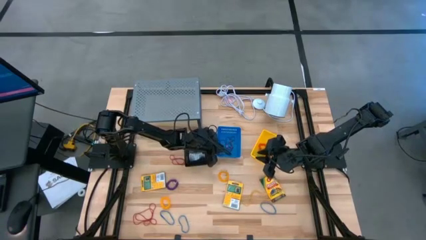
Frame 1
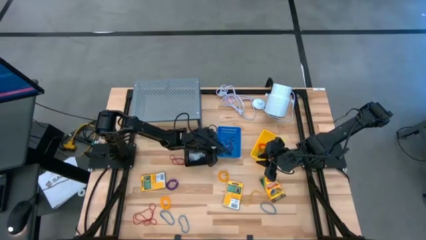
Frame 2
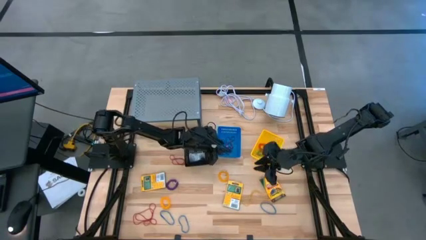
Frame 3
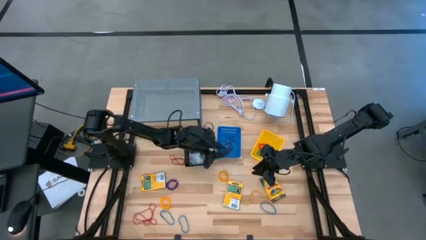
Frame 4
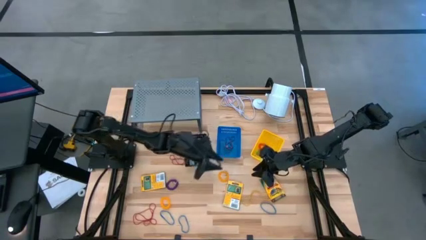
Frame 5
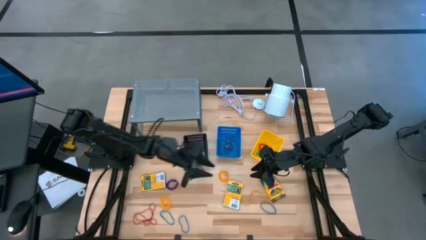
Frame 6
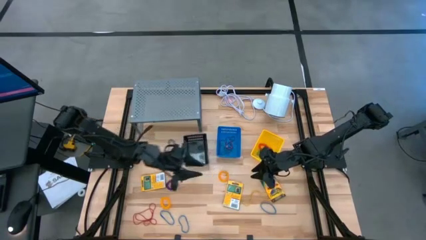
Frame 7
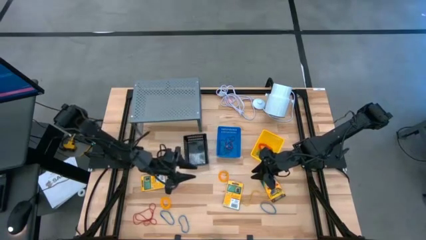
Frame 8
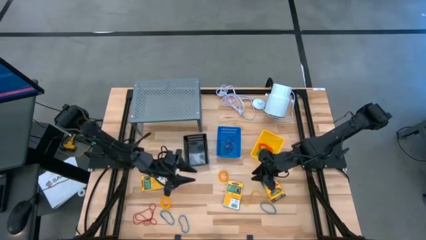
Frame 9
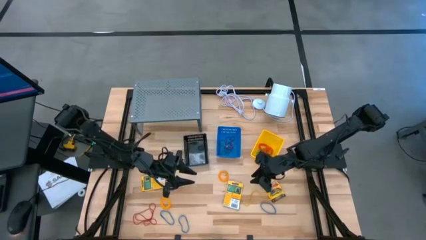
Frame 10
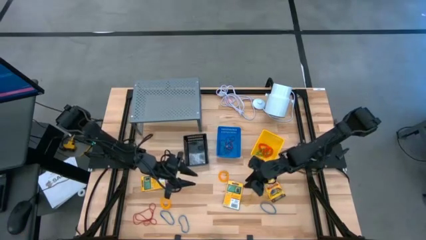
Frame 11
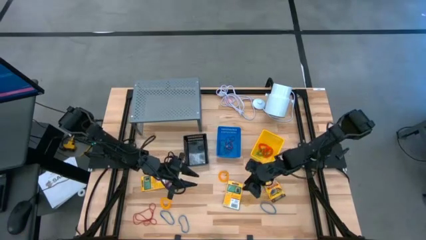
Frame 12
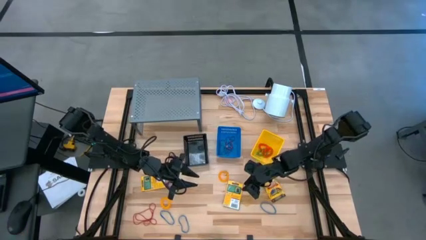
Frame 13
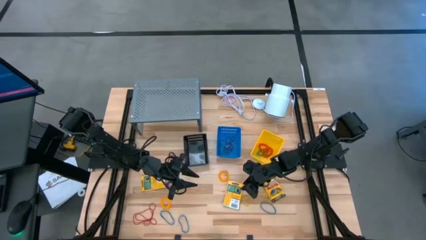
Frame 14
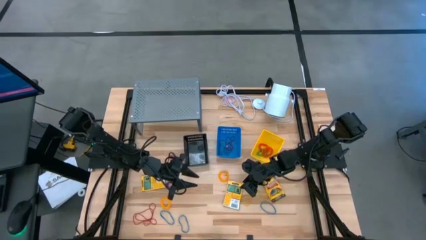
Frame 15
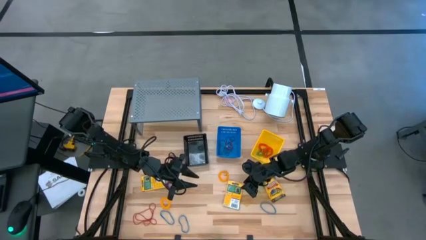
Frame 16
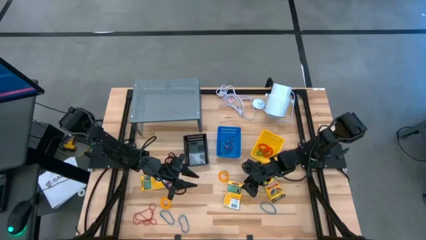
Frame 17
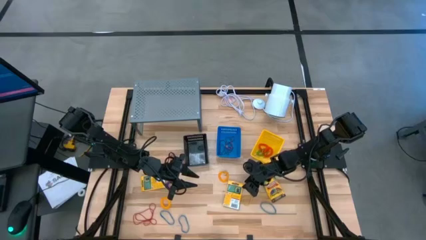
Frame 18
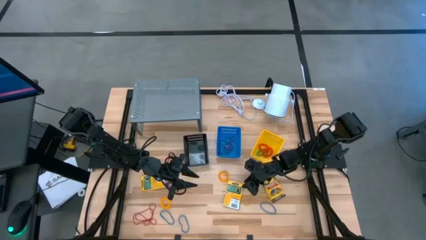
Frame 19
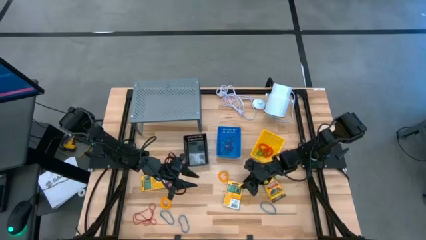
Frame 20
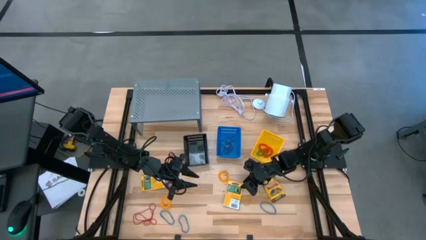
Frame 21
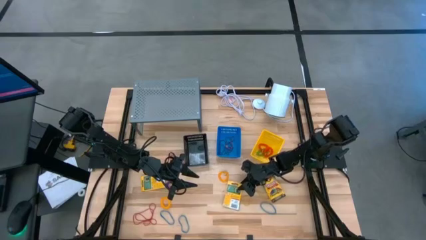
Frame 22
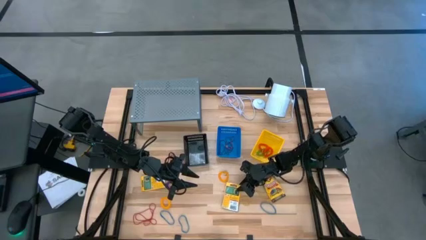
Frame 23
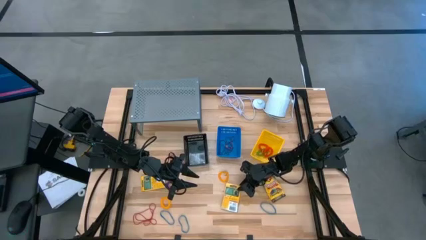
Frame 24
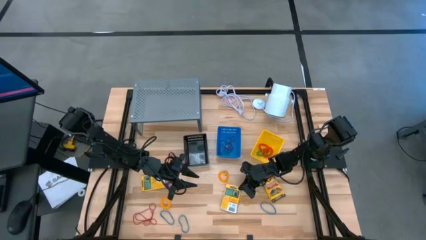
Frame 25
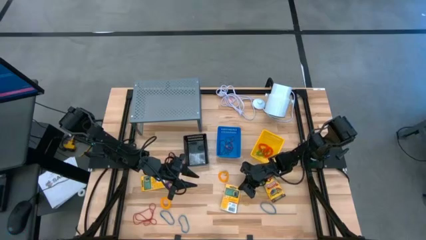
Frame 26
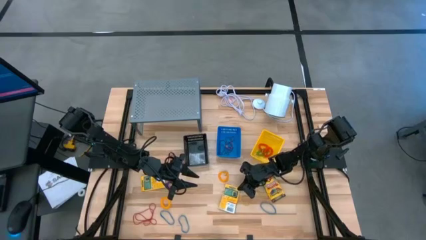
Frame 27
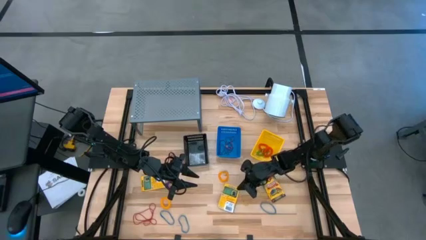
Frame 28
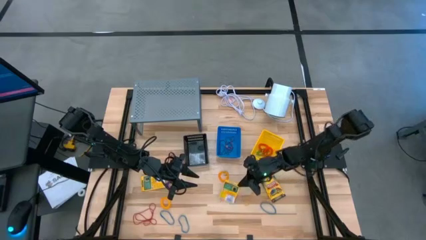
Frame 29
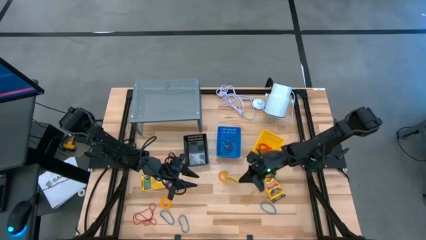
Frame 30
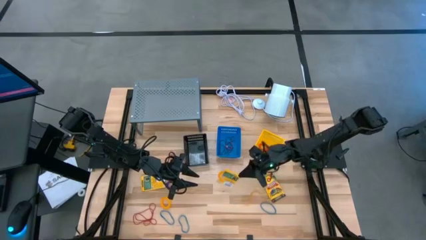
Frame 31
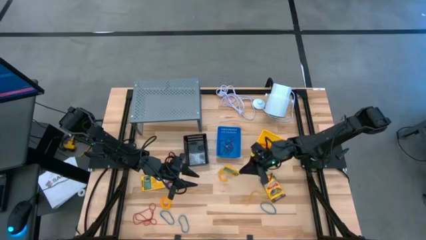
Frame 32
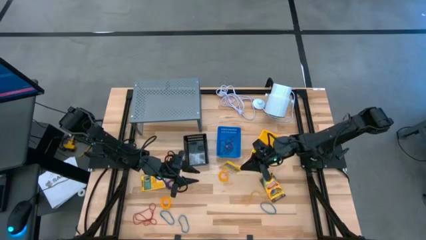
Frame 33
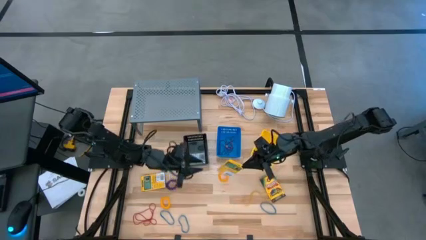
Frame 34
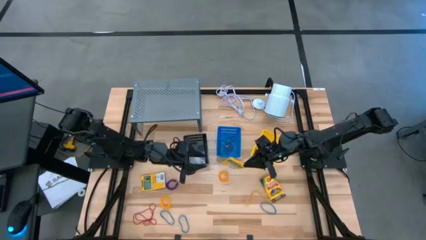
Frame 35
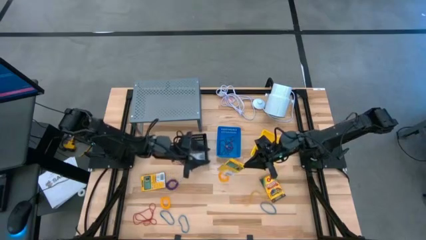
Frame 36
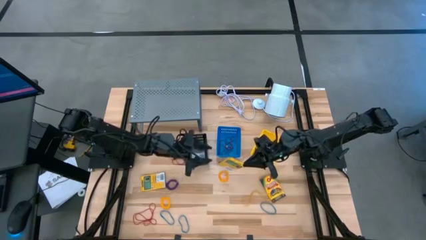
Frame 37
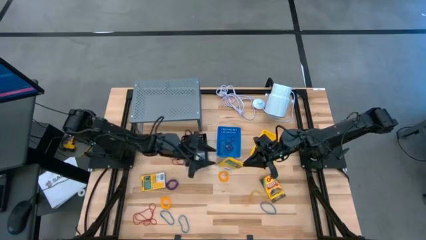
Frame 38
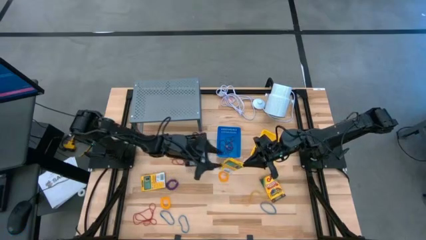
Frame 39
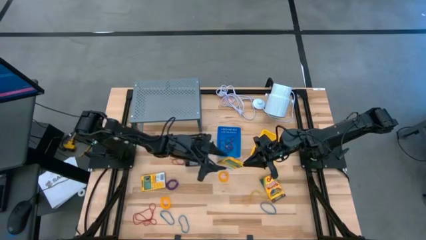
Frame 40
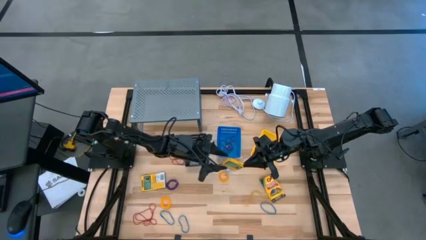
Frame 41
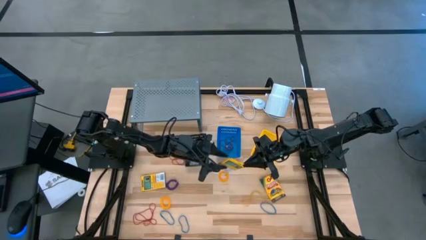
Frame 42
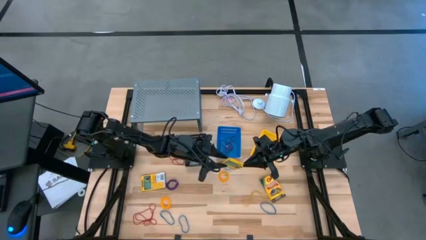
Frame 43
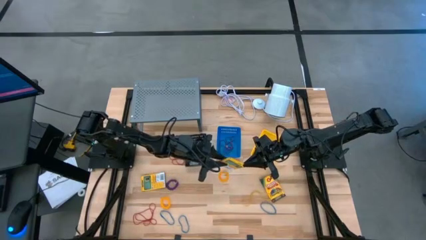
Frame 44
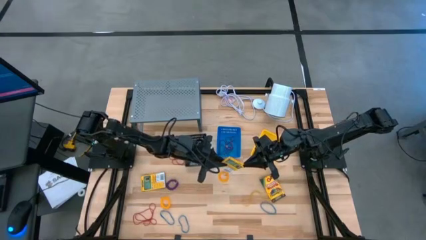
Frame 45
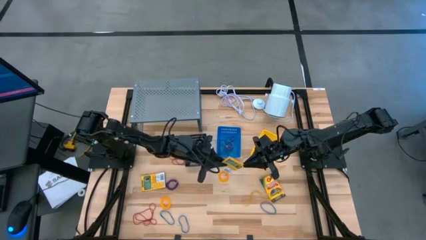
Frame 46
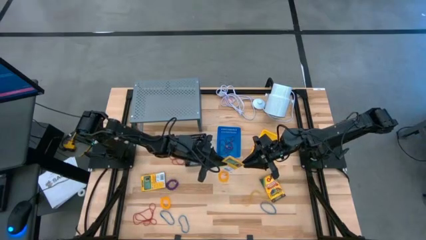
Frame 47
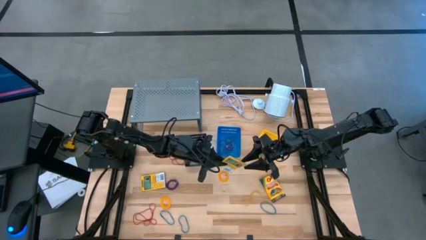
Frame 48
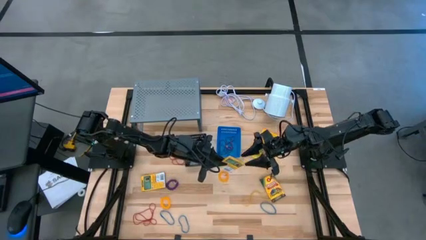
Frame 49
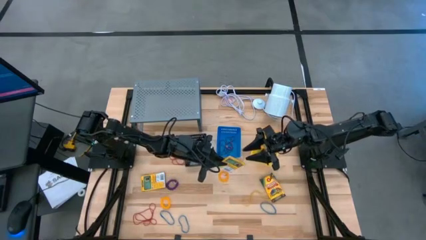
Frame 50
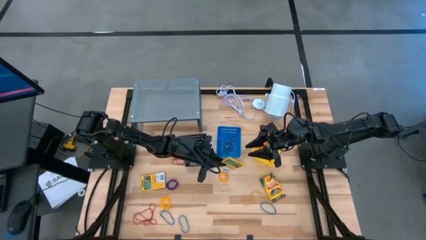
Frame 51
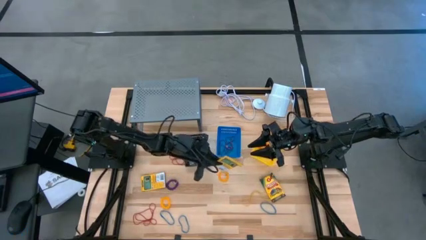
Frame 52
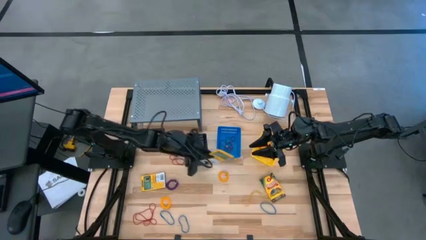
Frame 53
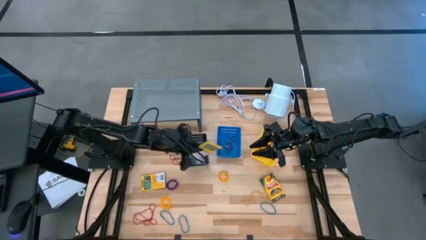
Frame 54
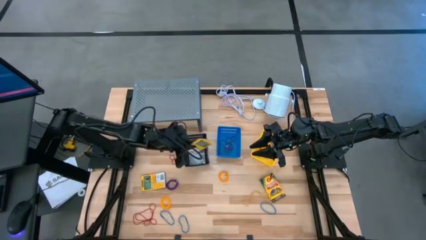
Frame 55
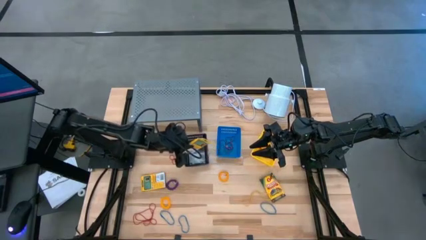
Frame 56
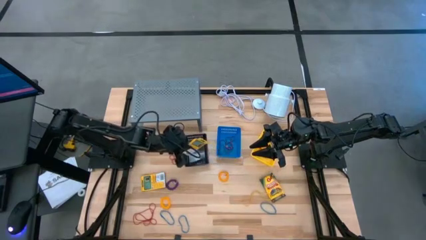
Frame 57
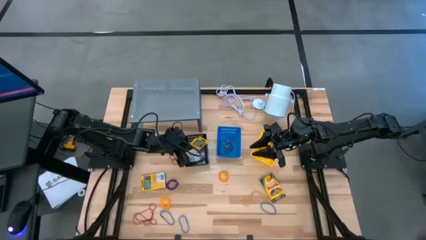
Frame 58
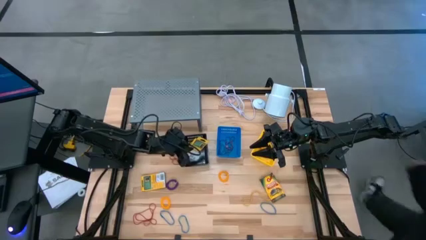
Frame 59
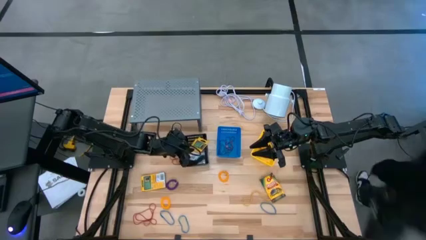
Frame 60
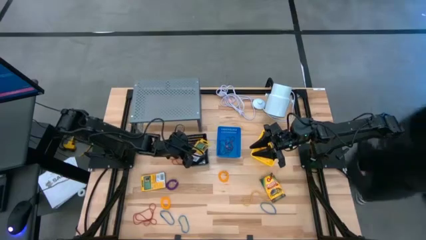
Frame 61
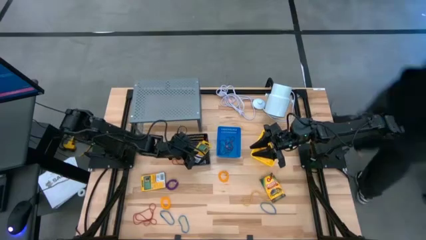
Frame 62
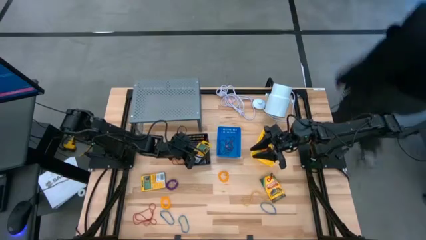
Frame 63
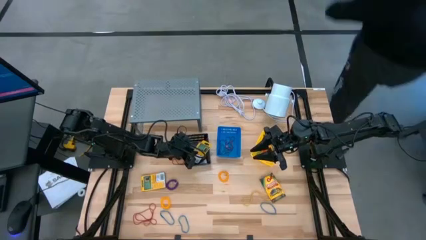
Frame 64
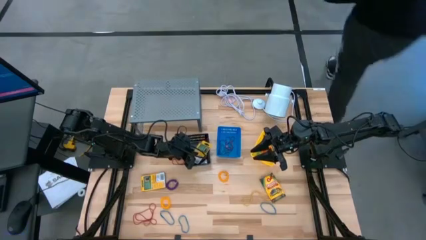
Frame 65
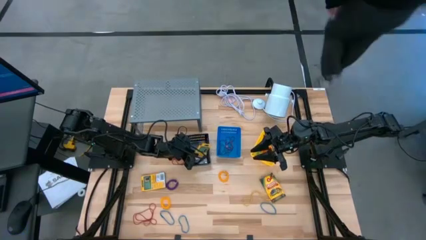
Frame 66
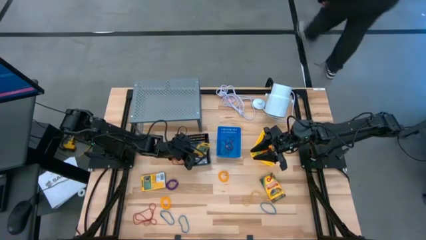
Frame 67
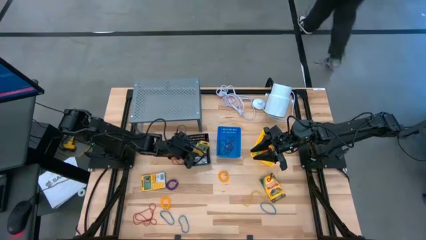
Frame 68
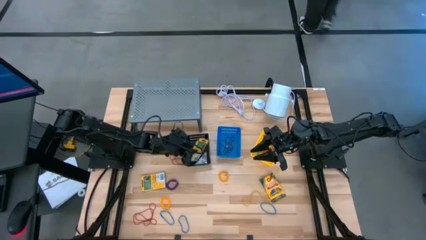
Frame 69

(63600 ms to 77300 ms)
Task: Pick & Place Office Desk Supplies
Put the crayon box into the black basket
